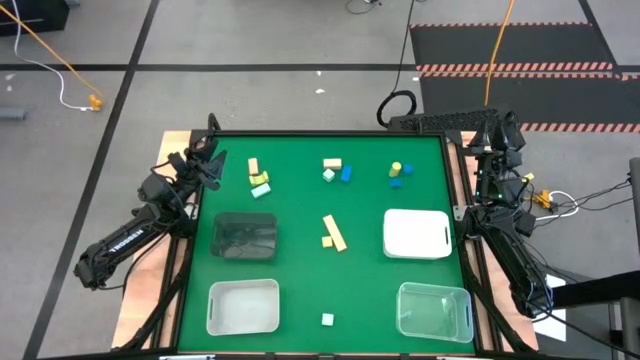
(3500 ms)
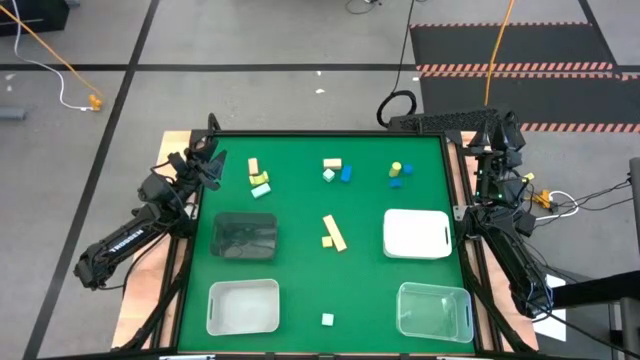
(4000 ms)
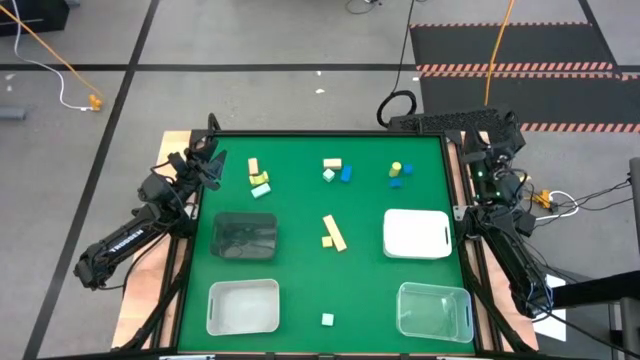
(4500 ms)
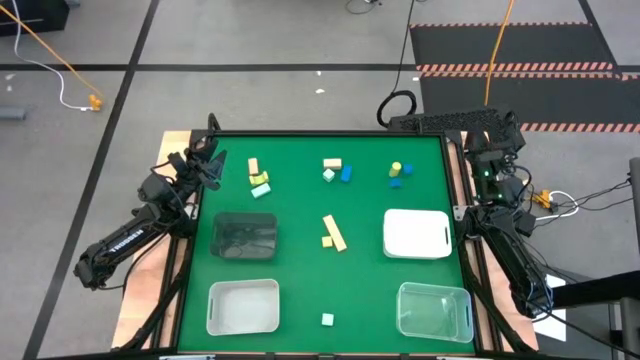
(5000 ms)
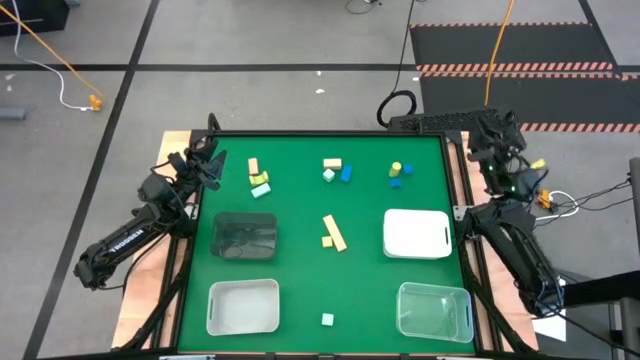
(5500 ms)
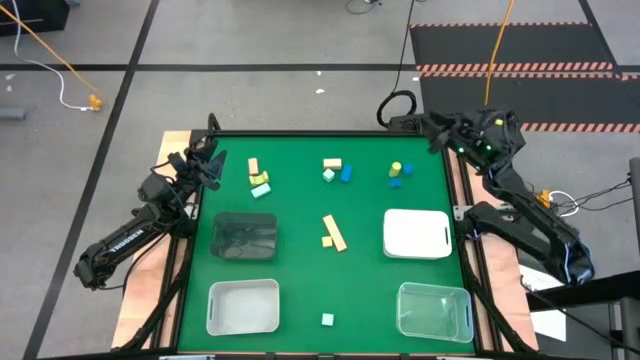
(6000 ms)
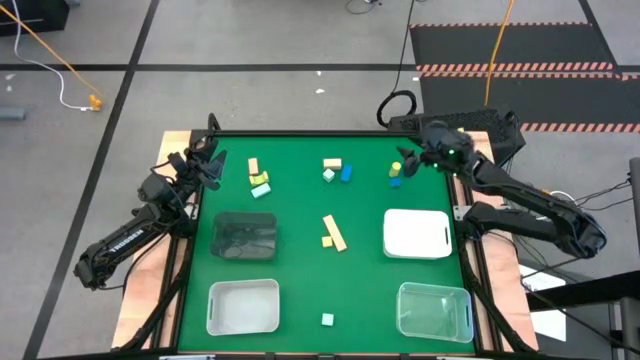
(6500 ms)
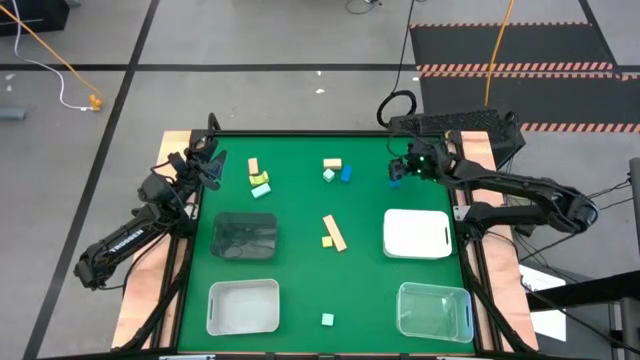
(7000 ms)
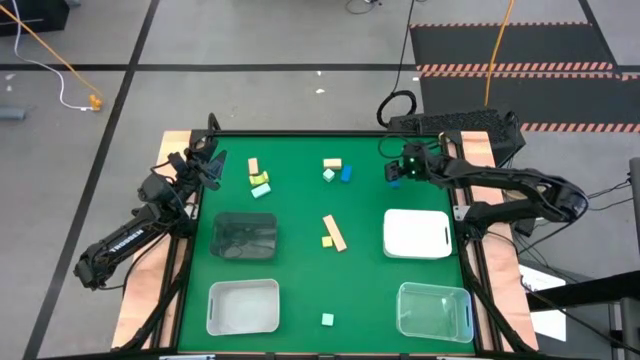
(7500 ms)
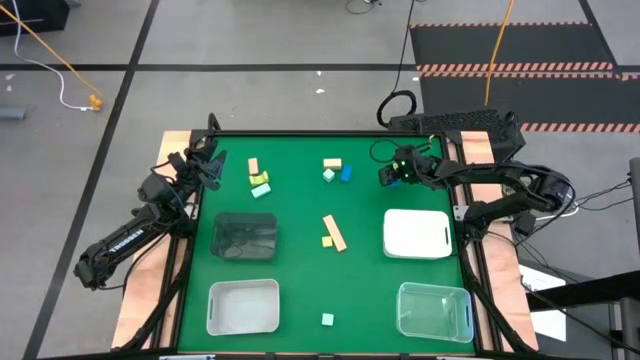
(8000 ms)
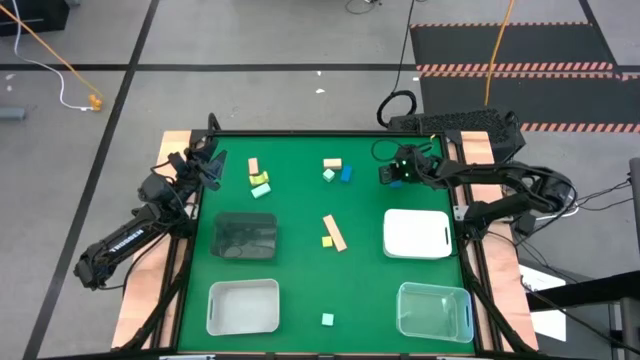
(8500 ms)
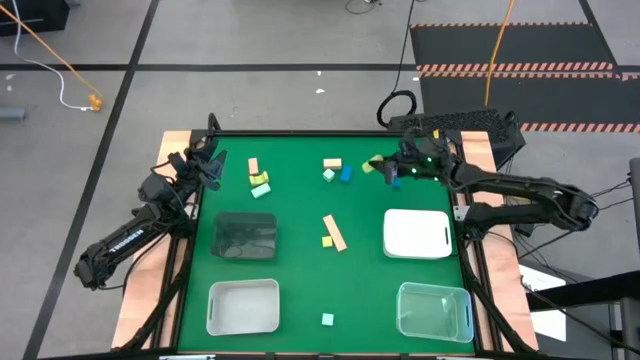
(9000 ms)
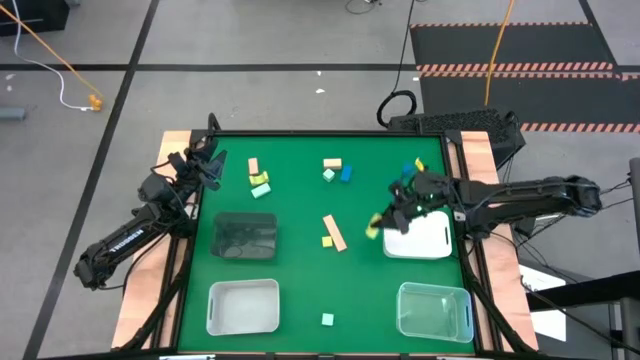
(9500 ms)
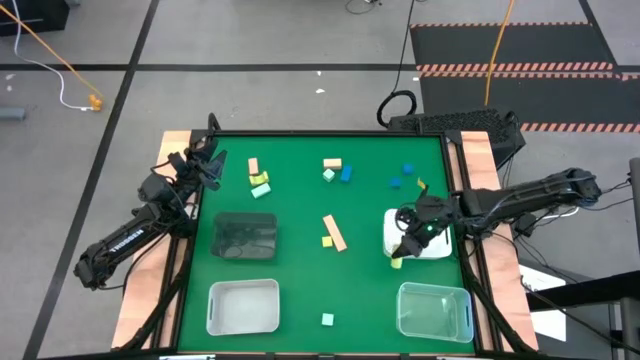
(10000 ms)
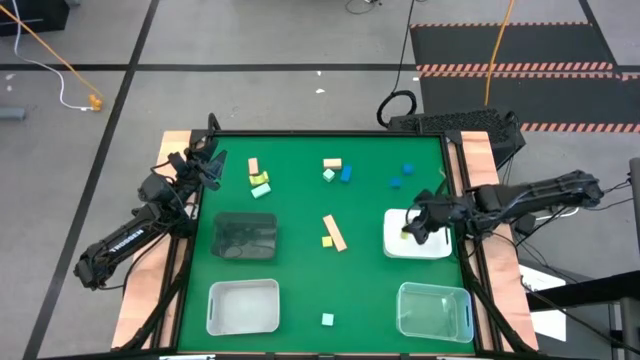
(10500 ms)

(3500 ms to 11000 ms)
Task: Sort & place blocks by color
Put the top right green block into the white bin

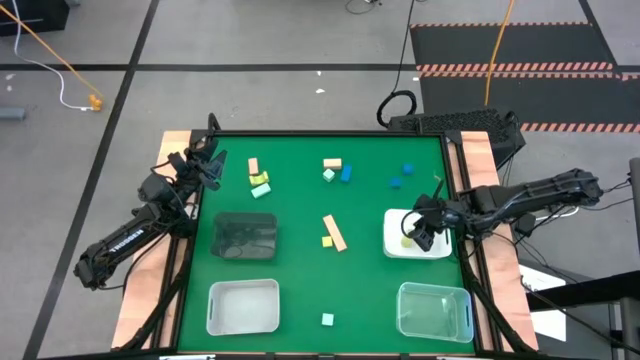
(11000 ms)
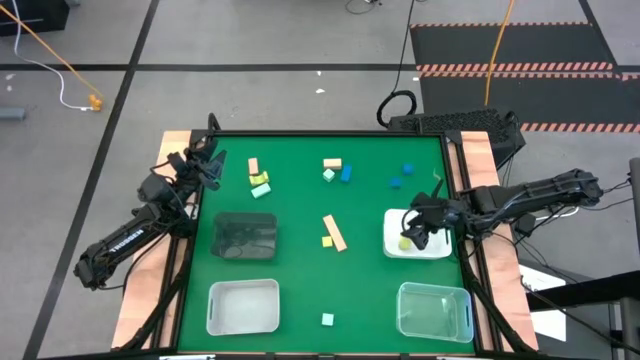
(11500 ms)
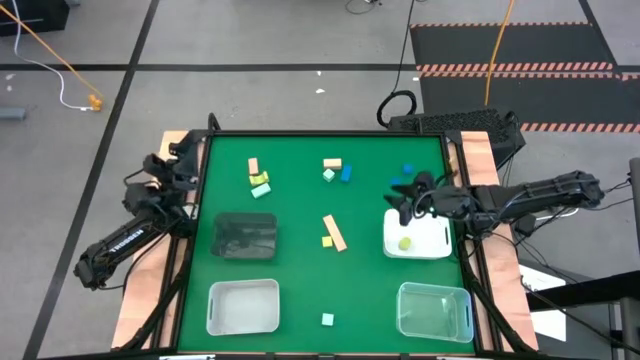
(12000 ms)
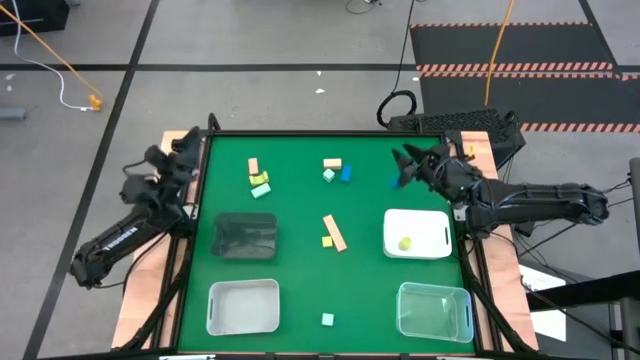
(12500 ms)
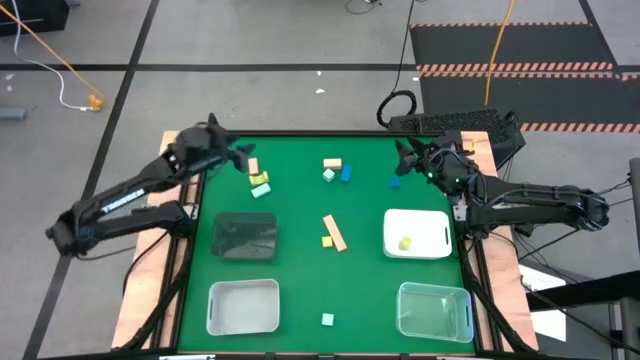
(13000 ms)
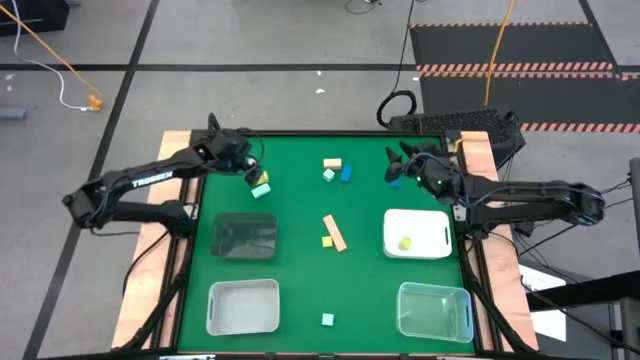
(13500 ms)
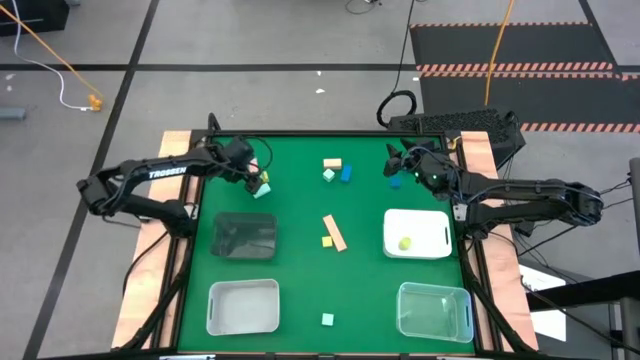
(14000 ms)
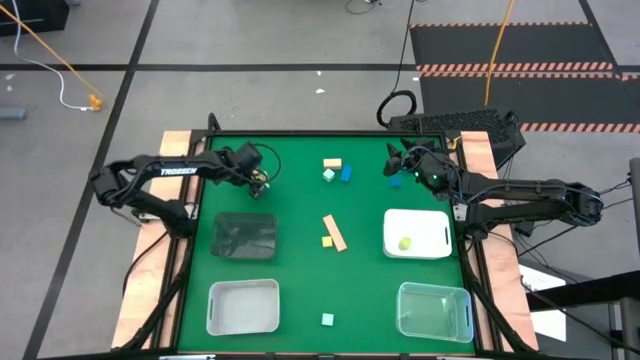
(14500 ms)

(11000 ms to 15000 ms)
Put the top green block into the white bin

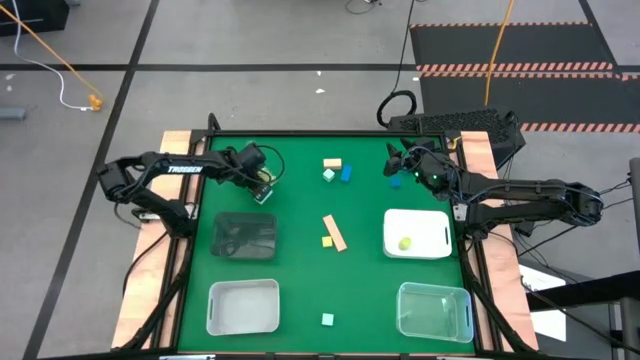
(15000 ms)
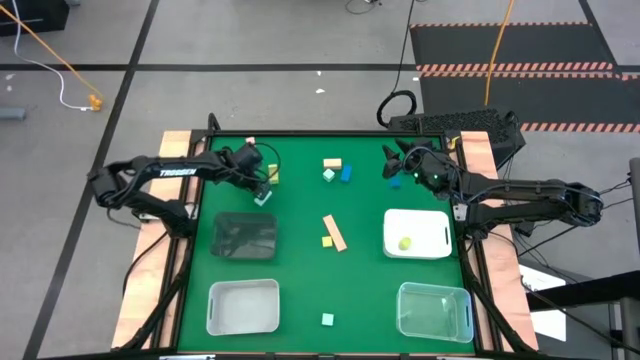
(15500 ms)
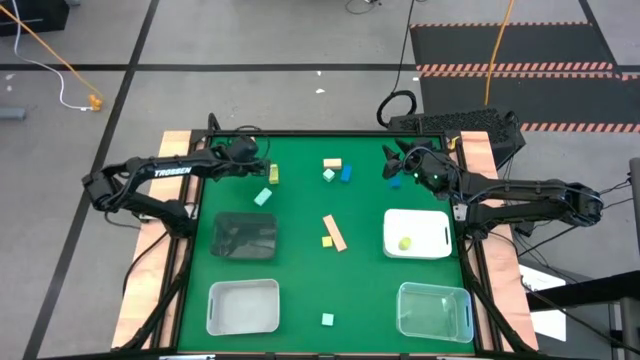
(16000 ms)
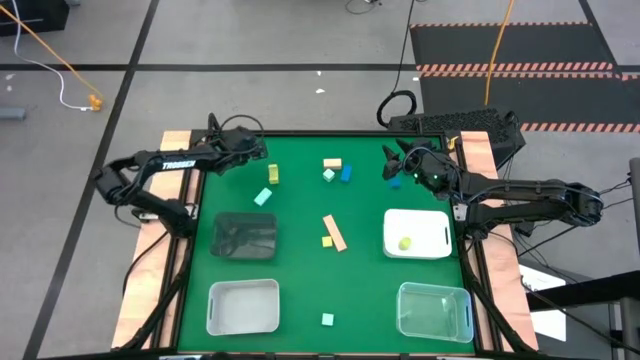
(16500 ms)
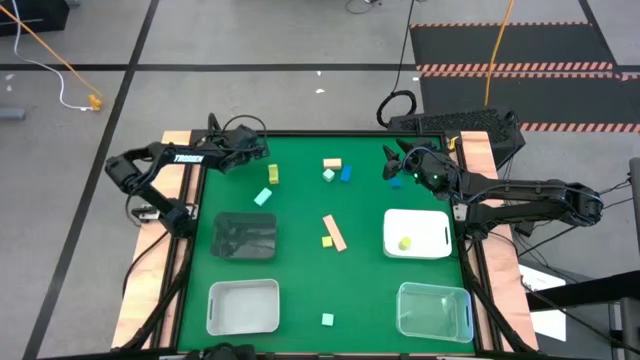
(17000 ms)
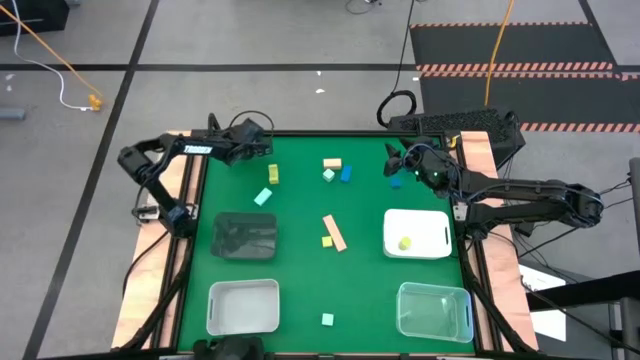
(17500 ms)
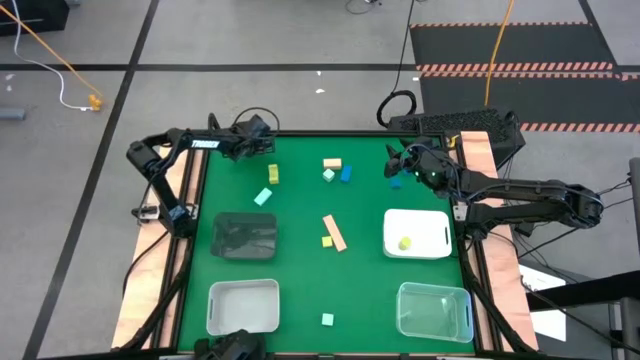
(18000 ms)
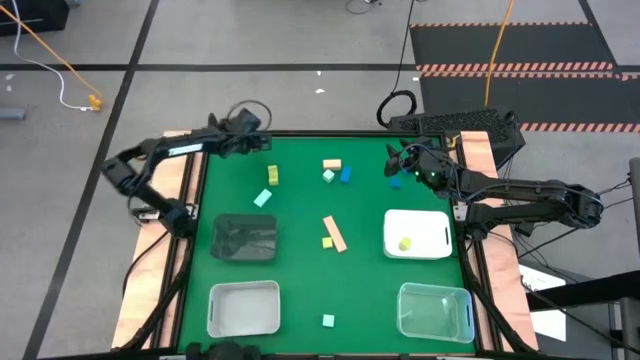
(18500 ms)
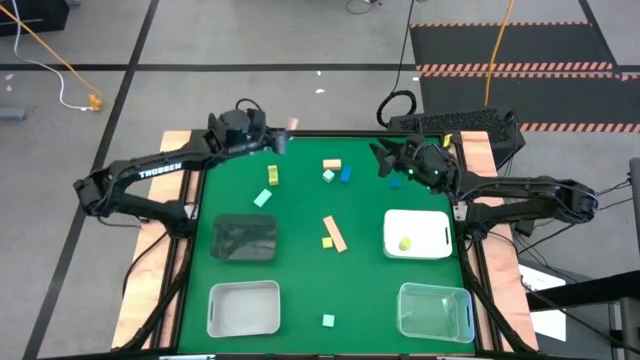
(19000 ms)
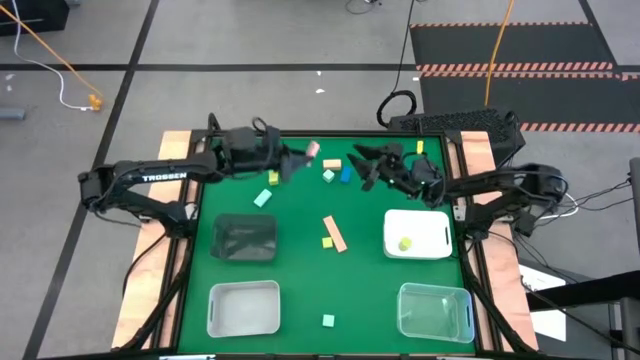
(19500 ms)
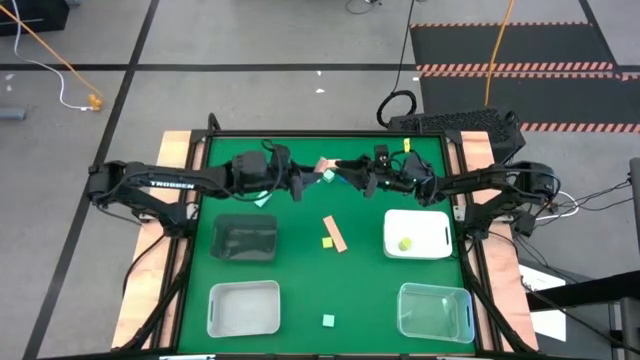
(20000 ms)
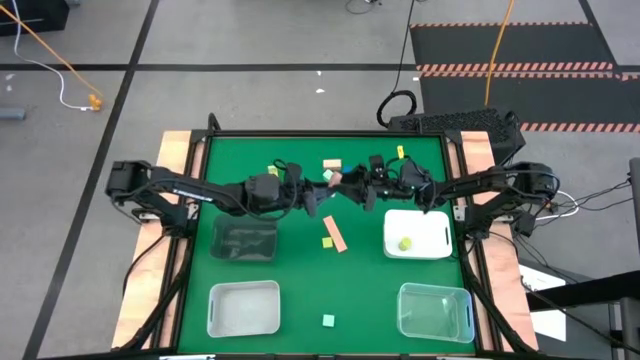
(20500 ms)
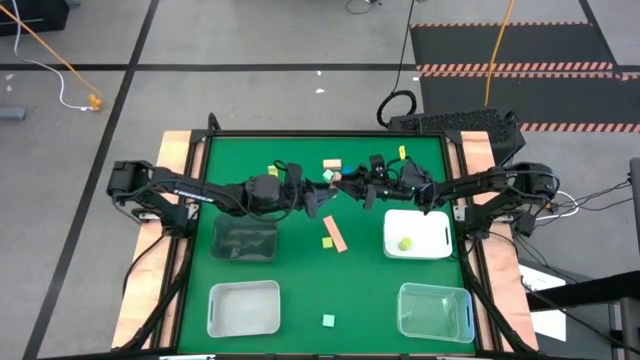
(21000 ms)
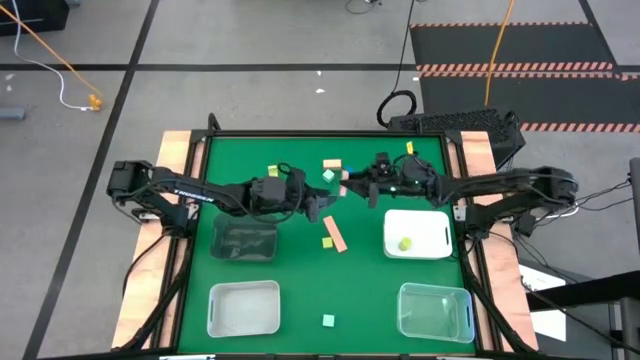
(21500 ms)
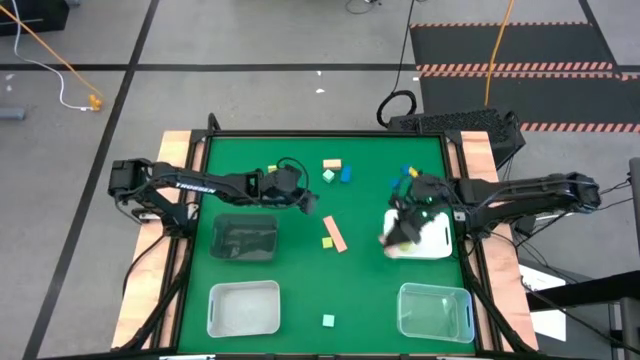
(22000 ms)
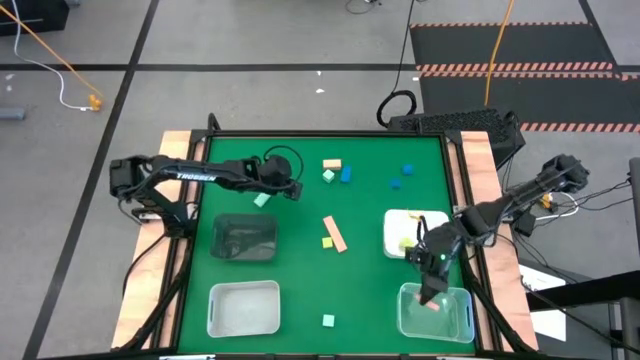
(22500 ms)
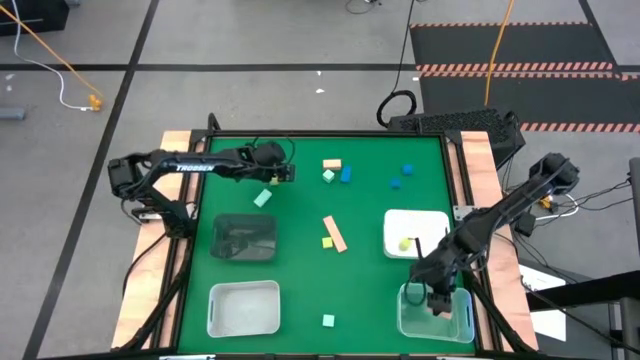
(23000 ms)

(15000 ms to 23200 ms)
Put the top left brown block into the transparent bin

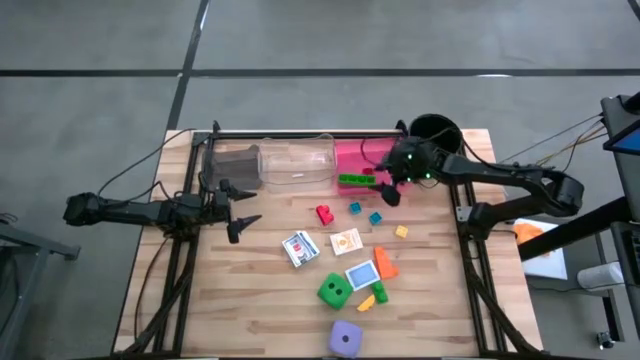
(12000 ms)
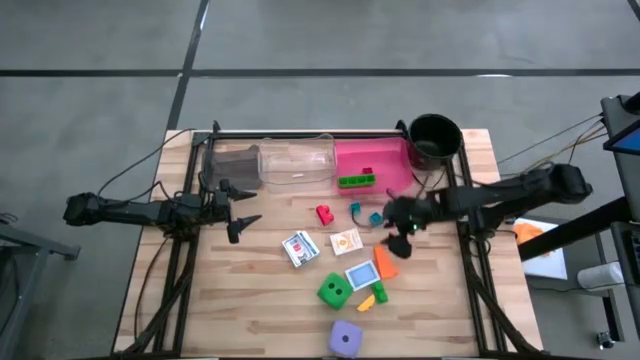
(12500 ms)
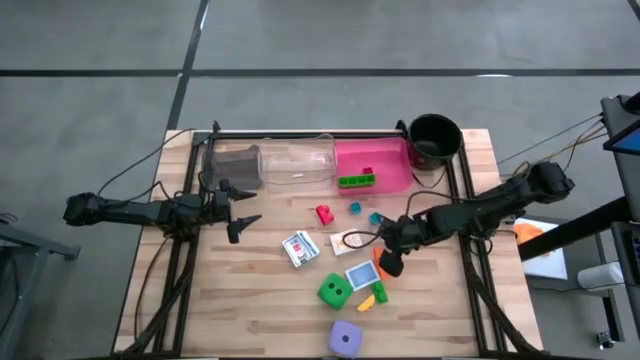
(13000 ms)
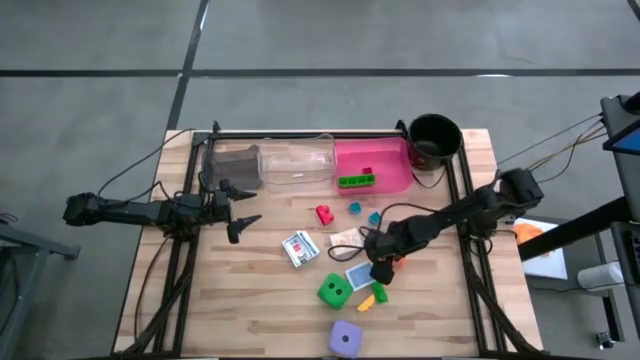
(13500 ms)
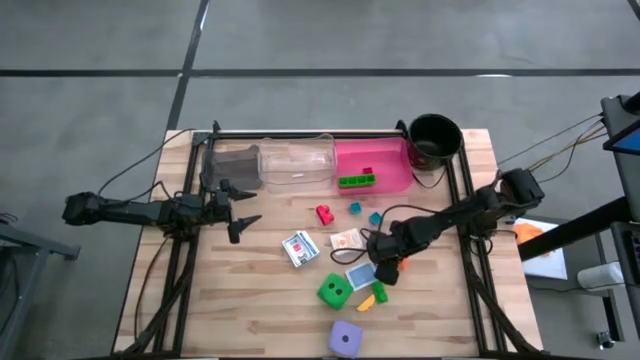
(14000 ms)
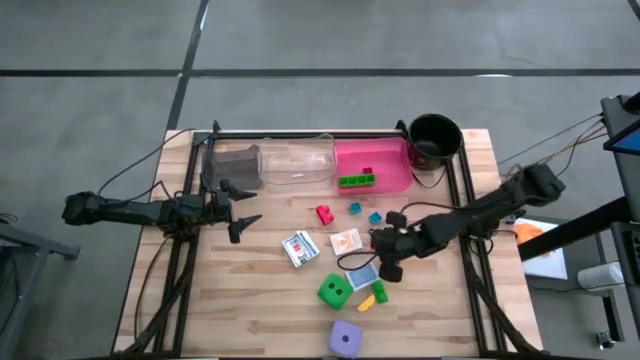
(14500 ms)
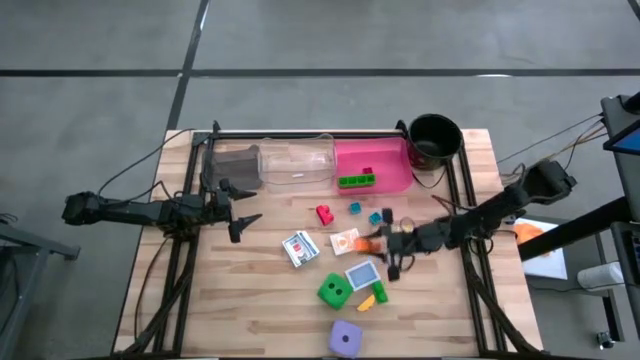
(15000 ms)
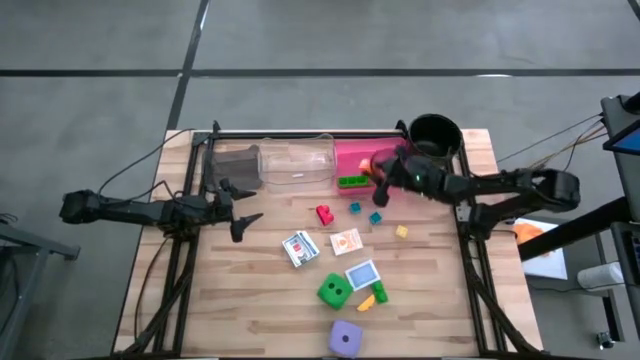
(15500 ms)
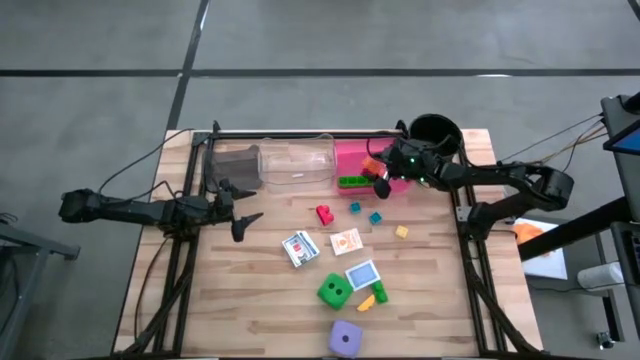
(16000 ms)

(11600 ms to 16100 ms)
Task: Pick & Place Toys
Put the orange game piece into the pink bin
